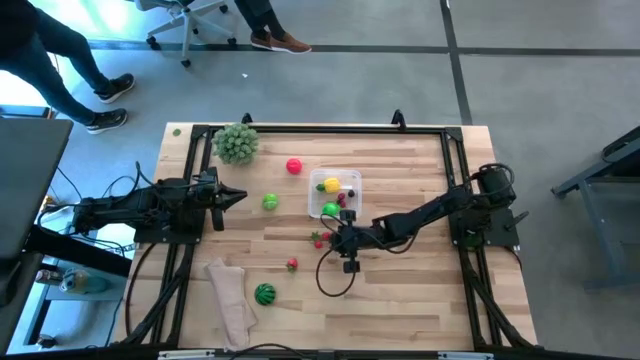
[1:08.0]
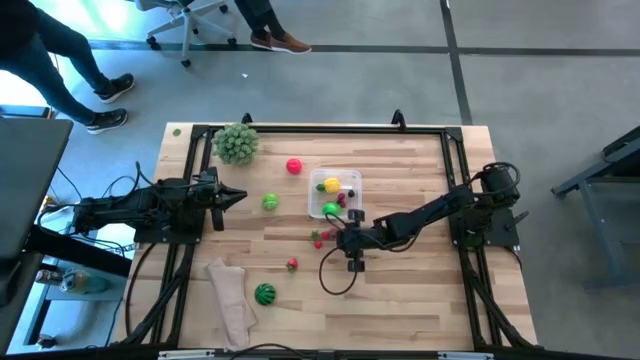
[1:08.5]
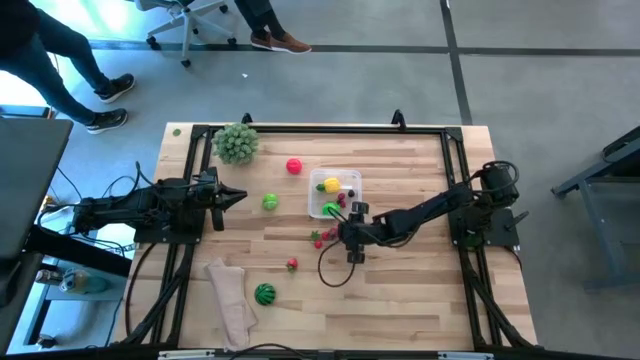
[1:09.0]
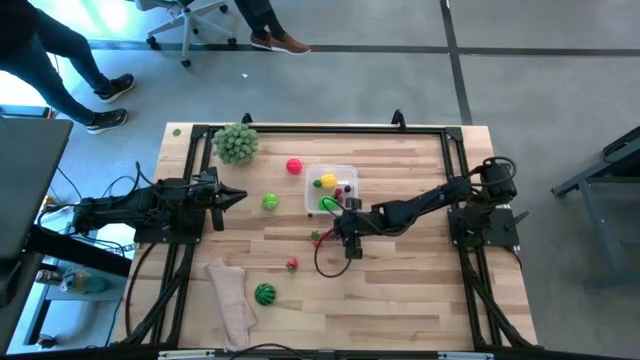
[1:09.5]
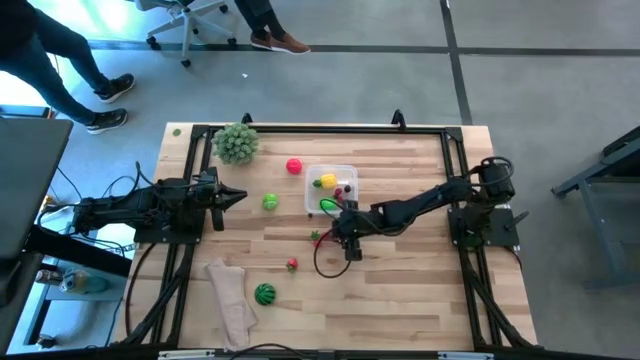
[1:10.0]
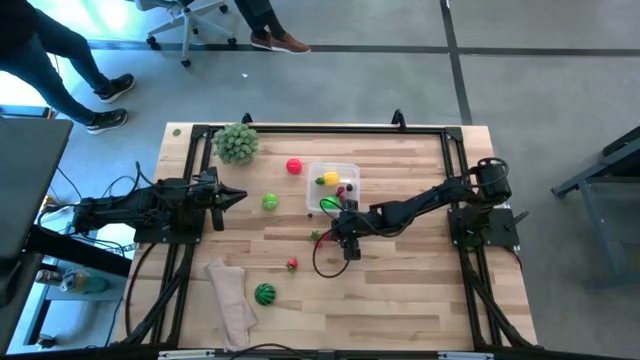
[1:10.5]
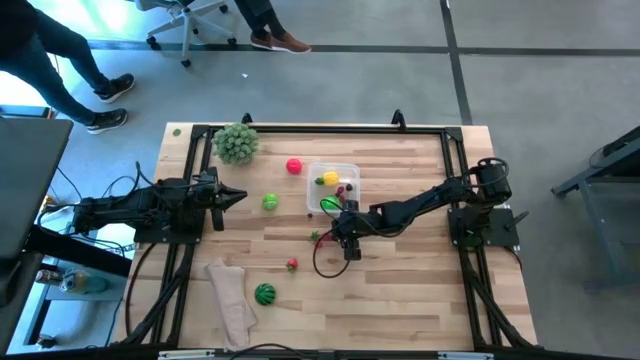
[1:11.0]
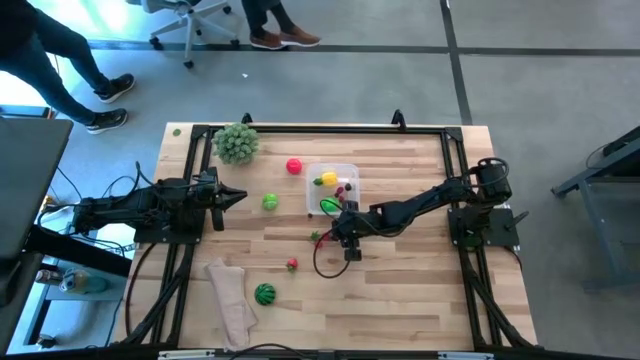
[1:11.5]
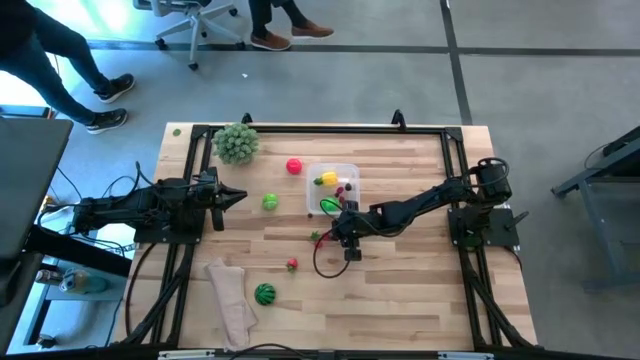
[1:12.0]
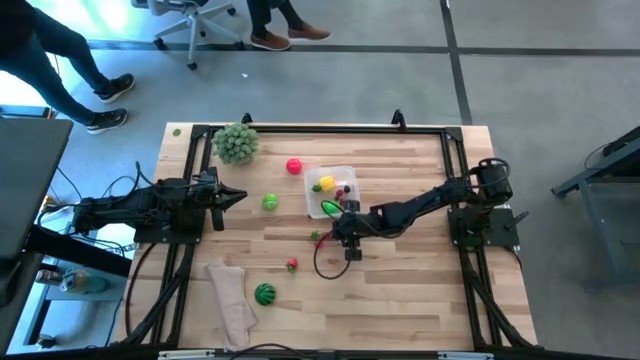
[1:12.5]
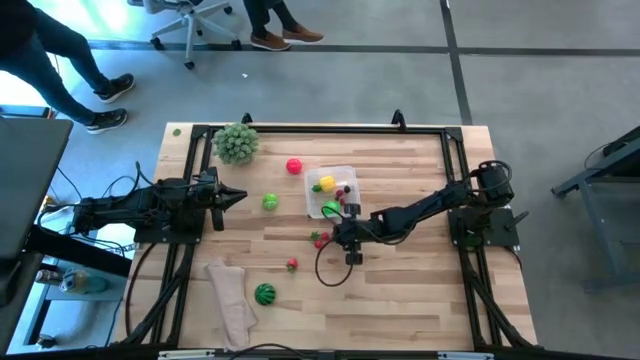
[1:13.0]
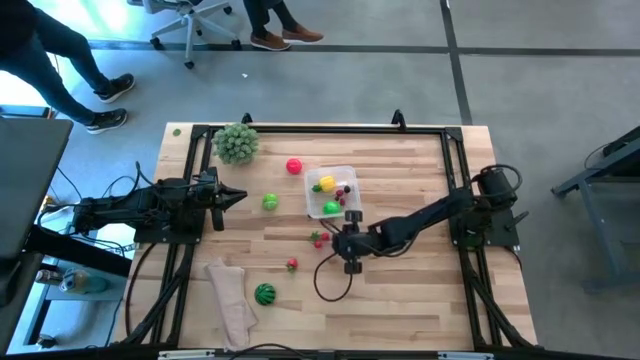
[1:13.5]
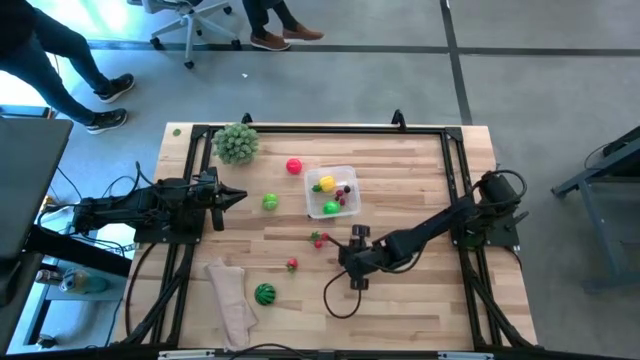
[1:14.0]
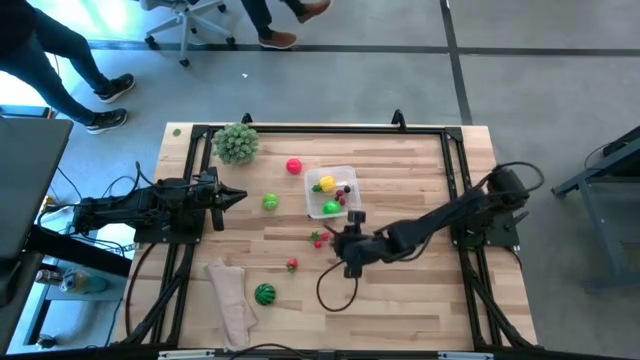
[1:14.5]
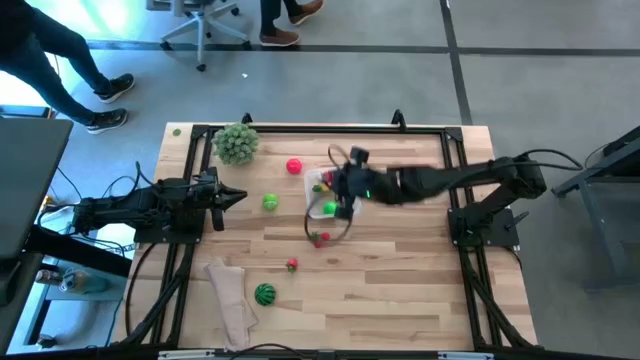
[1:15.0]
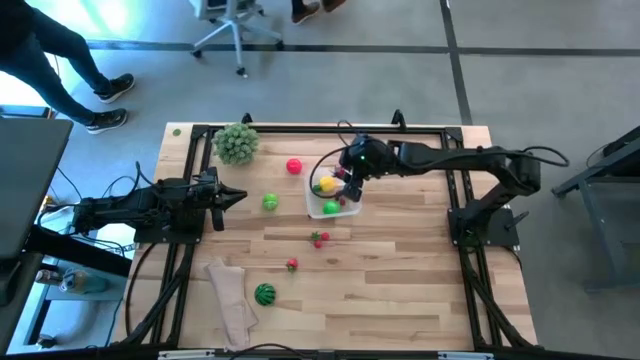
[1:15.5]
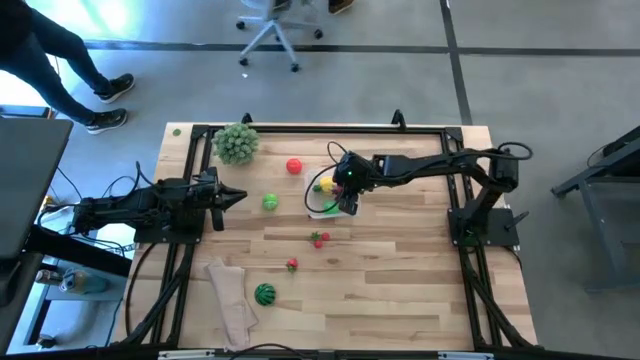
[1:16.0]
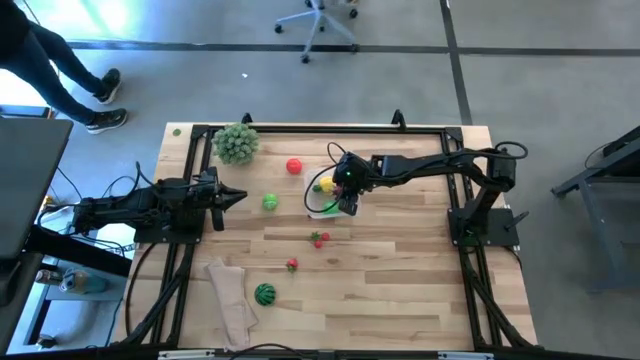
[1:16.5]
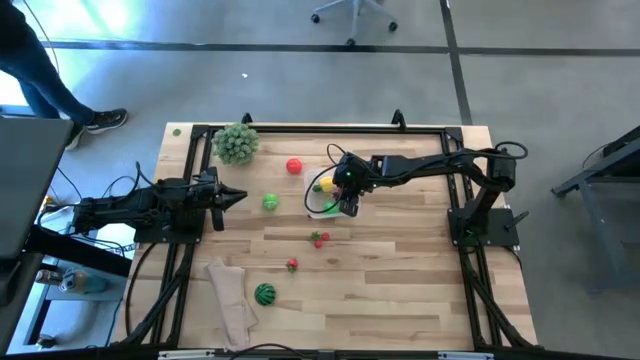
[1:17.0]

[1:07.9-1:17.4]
Task: Pick and placing Produce into tupperware
Put the red strawberry into the transparent container

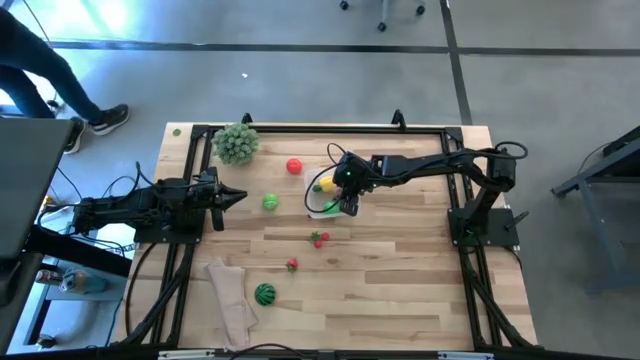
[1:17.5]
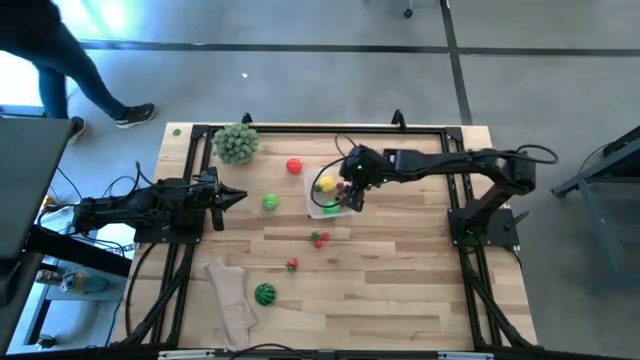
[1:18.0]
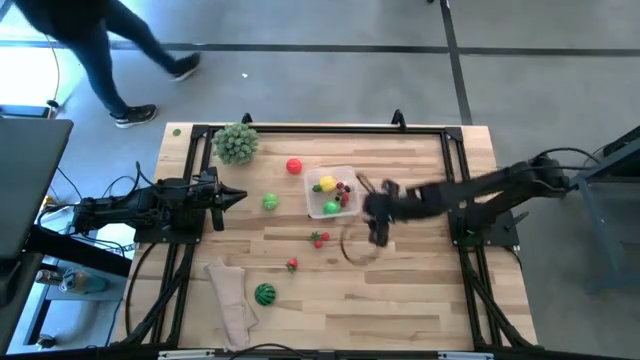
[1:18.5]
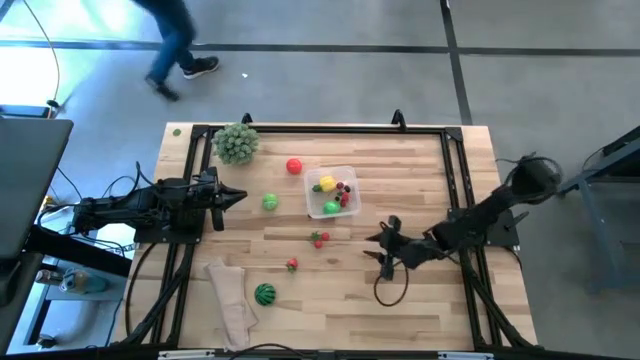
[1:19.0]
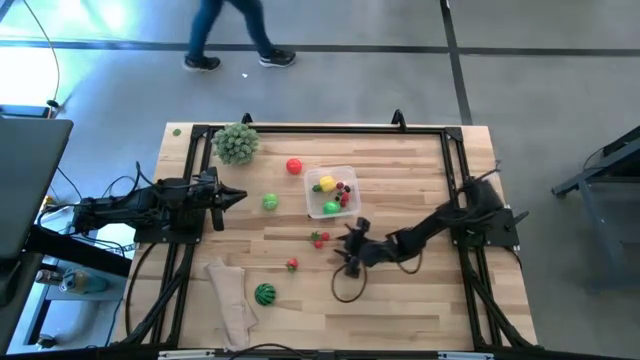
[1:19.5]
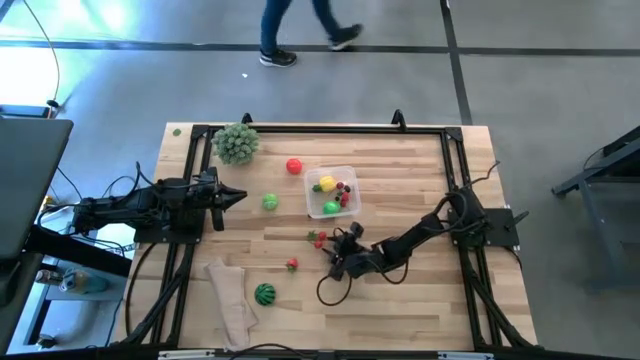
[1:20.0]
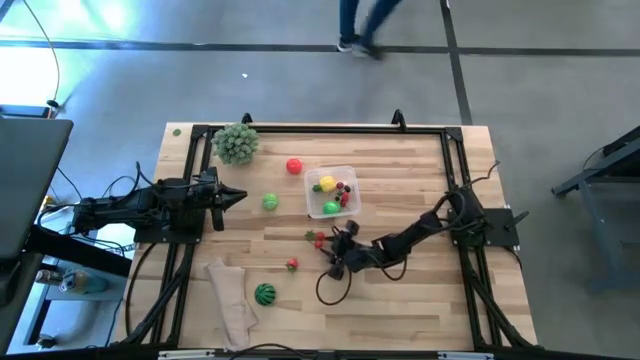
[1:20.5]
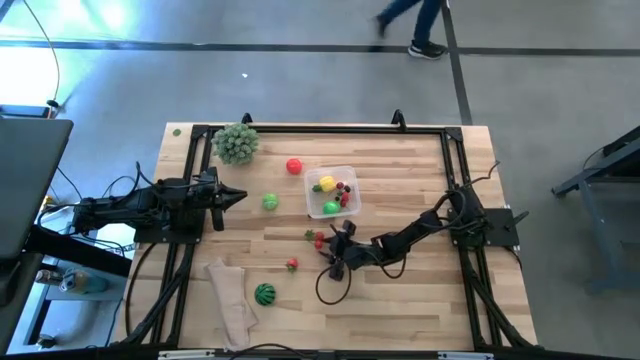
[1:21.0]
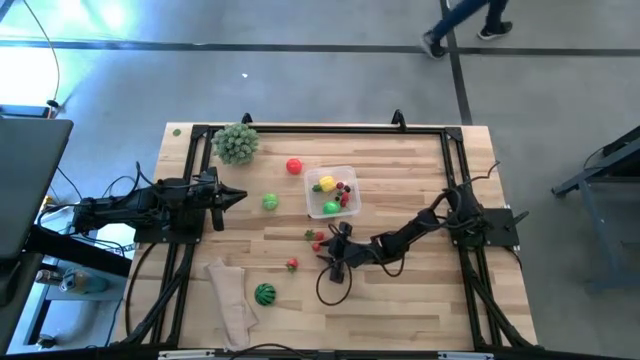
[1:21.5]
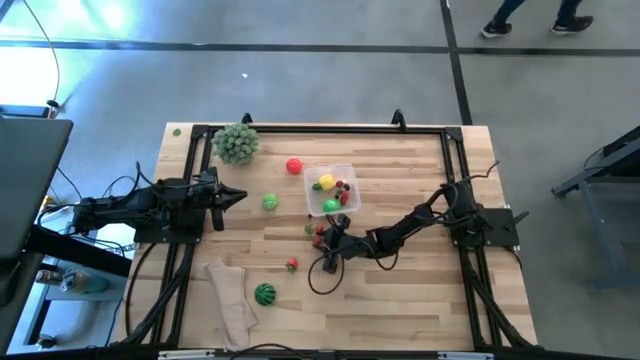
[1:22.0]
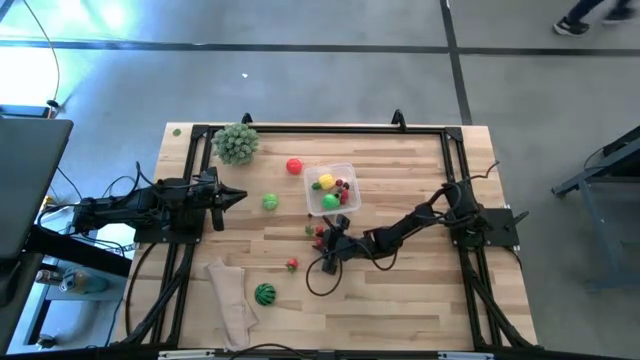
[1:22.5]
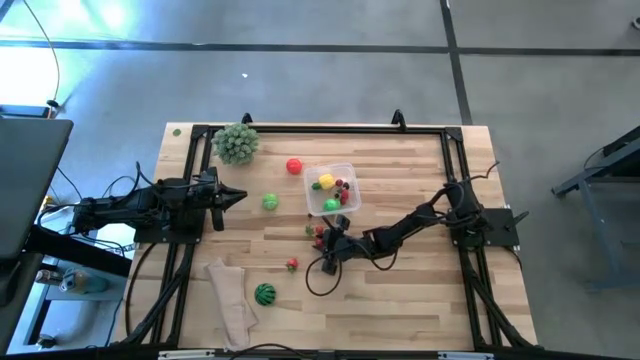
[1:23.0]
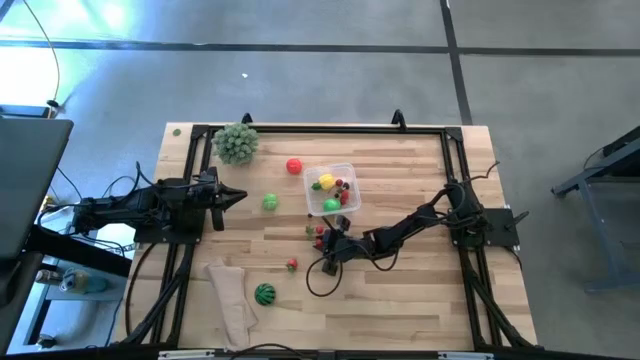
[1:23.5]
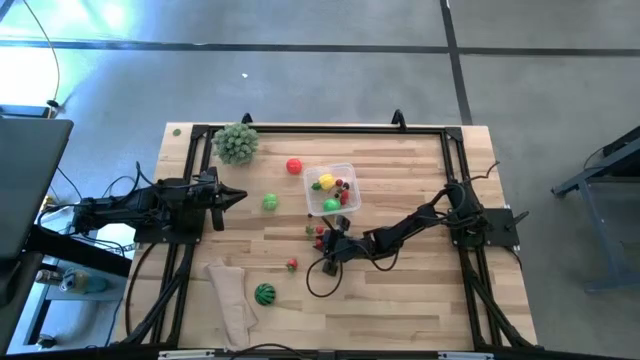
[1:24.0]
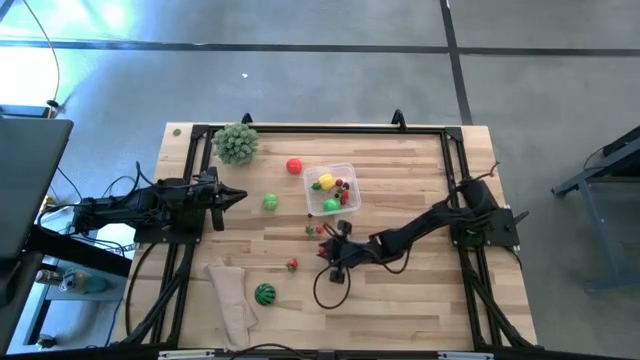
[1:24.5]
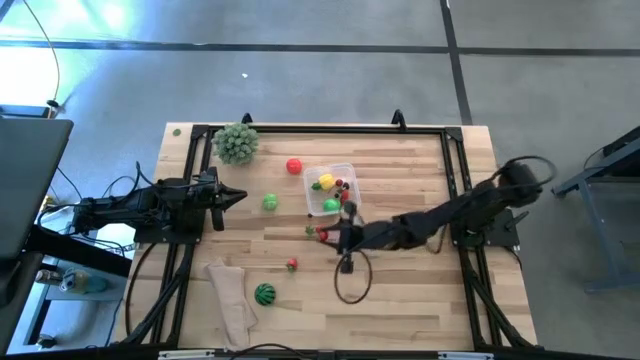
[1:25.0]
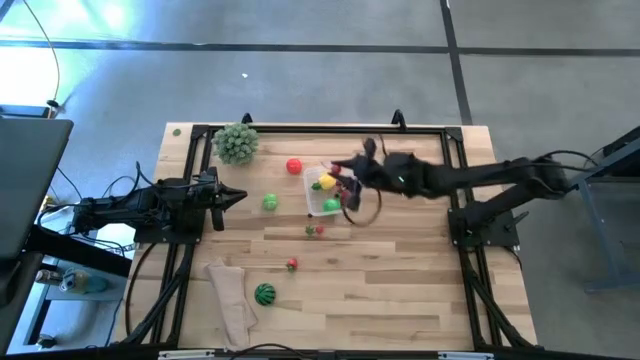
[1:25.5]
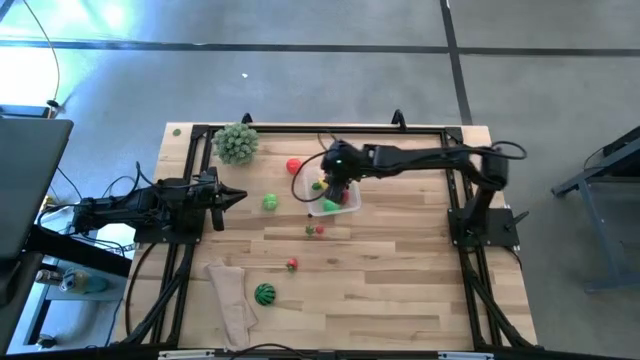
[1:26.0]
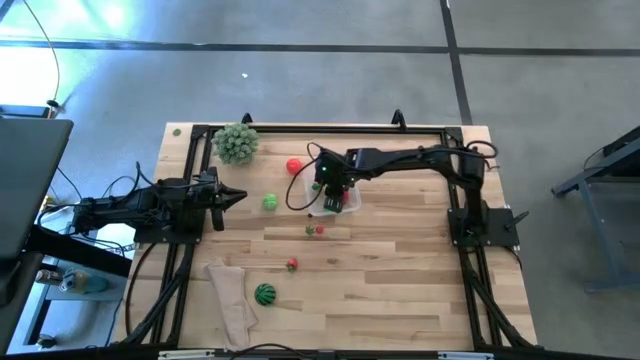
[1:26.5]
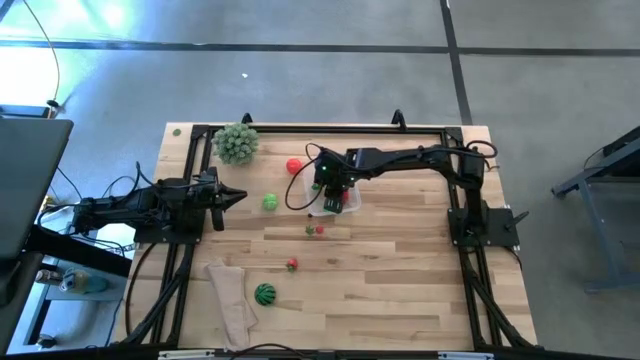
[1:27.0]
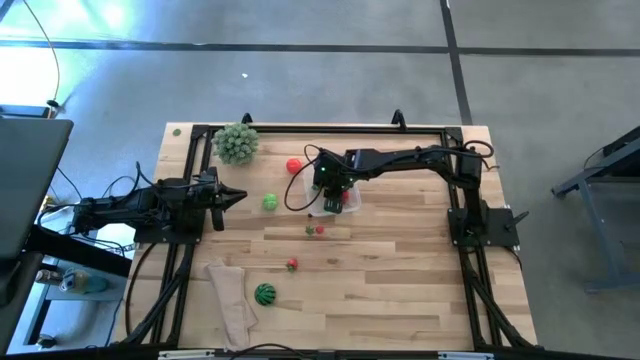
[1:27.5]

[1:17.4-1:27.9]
Put the red cherry into the transparent container

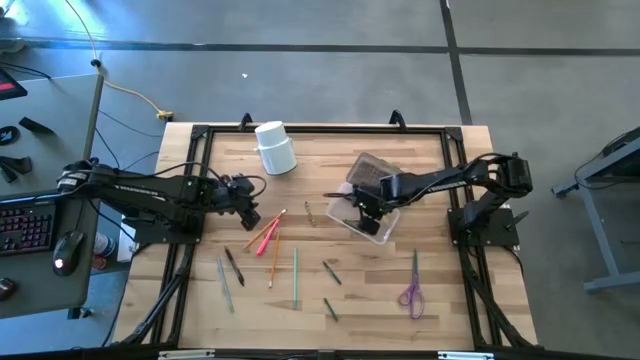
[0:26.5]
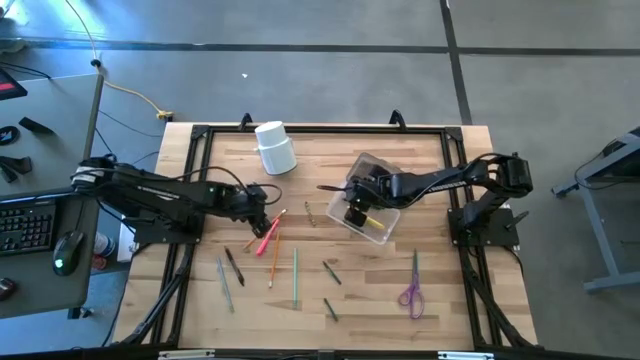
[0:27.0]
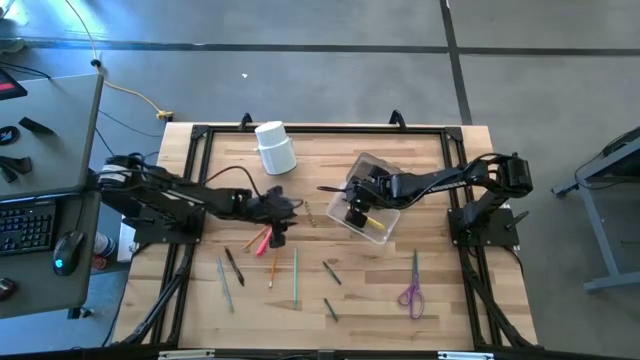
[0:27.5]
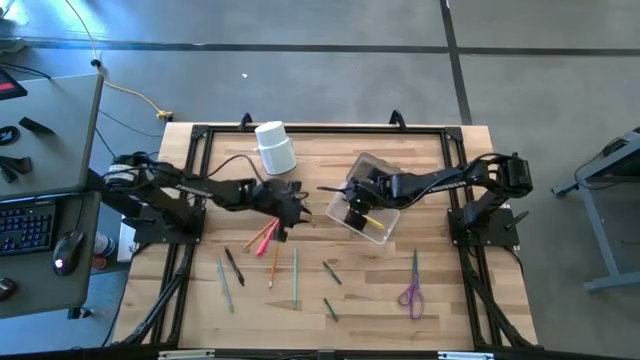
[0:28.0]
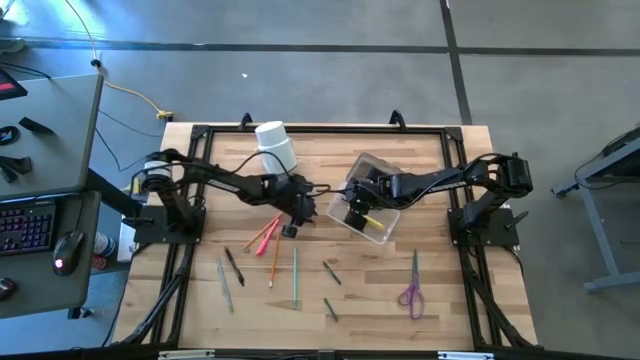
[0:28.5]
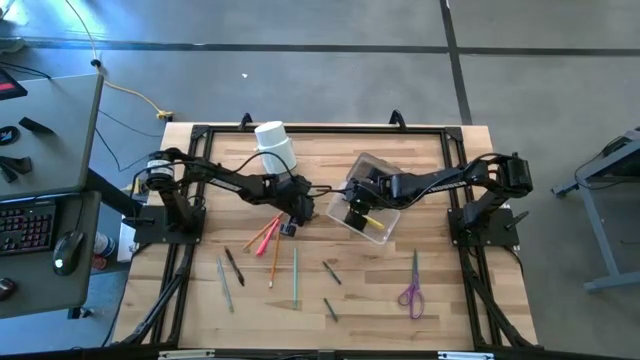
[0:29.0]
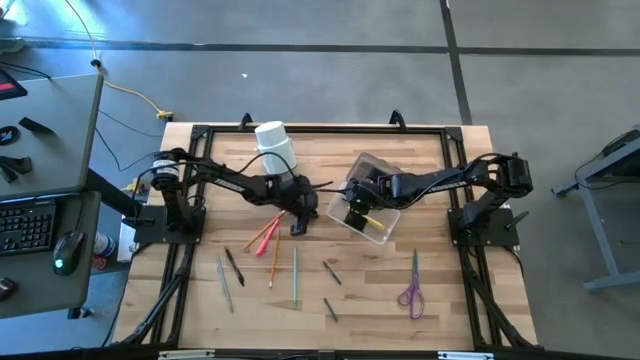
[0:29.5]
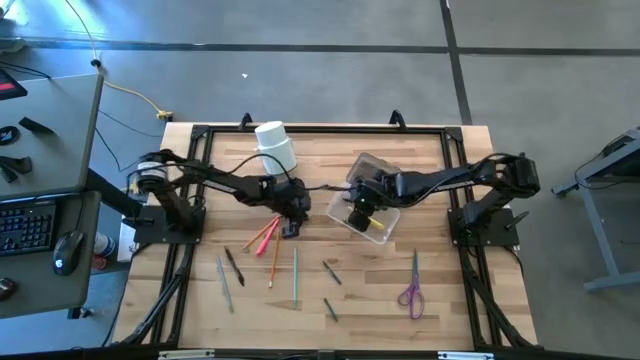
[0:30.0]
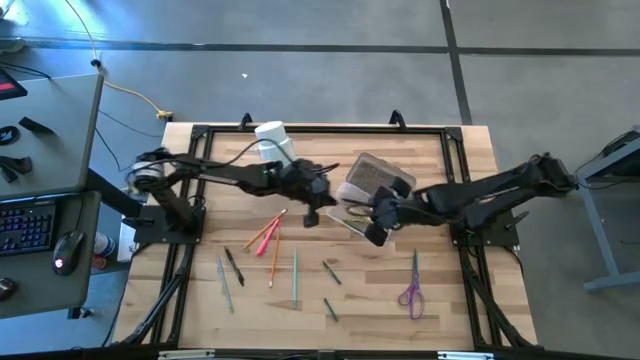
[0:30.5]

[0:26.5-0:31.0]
Task: Pick & place school supplies into a supply box
Put the green crayon into the supply box
